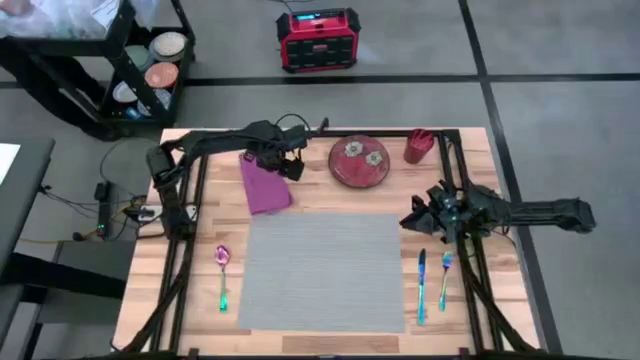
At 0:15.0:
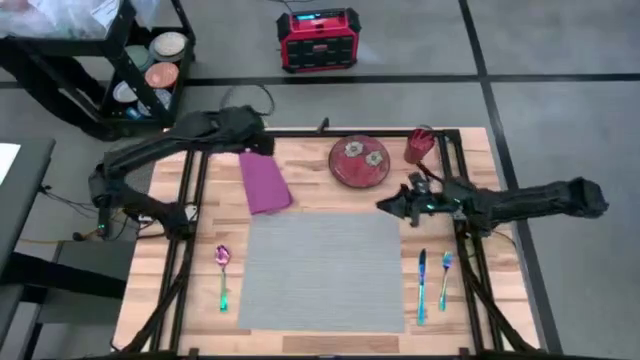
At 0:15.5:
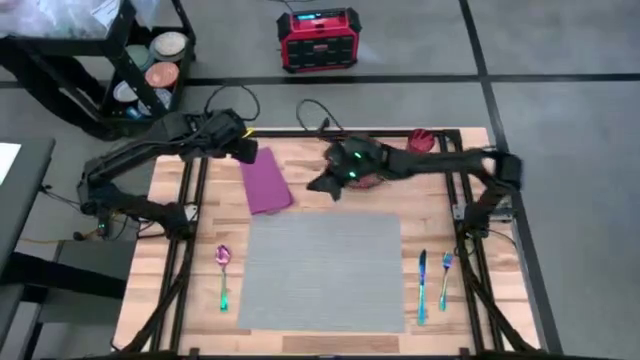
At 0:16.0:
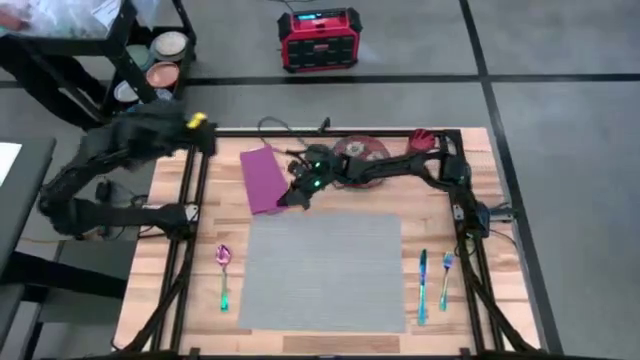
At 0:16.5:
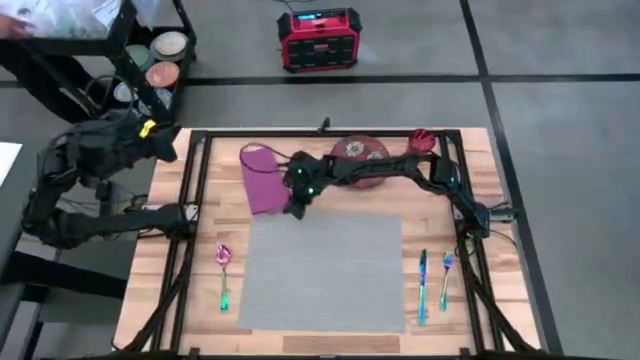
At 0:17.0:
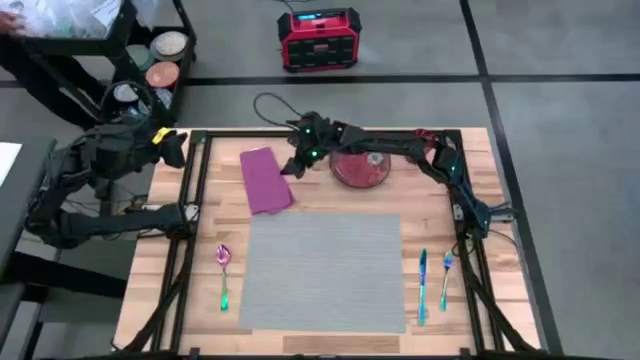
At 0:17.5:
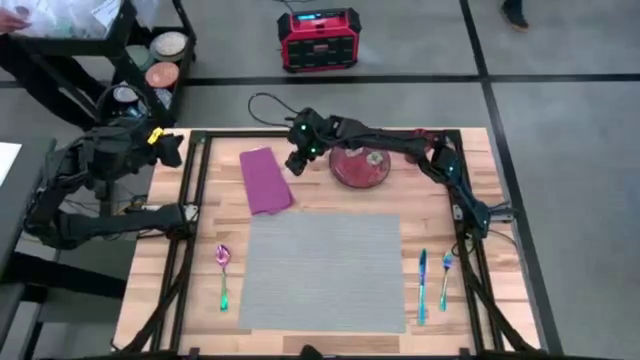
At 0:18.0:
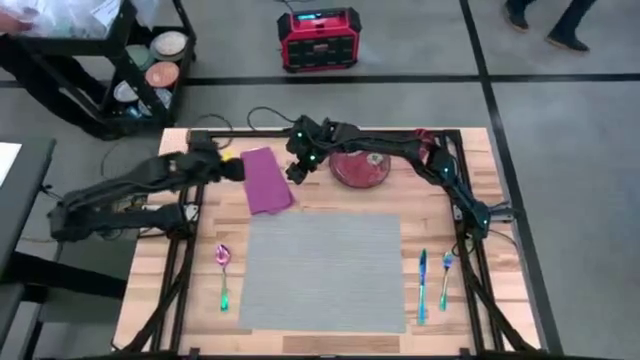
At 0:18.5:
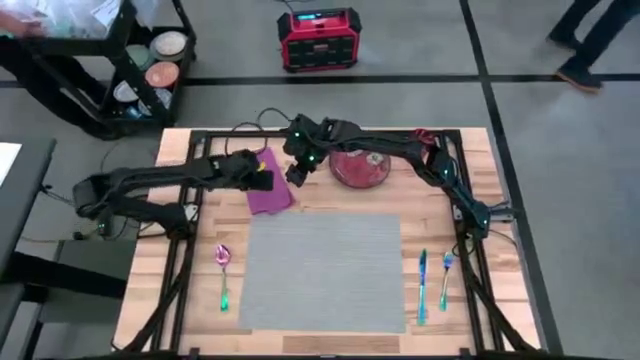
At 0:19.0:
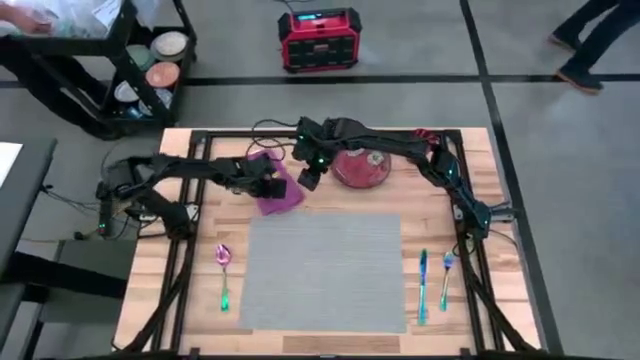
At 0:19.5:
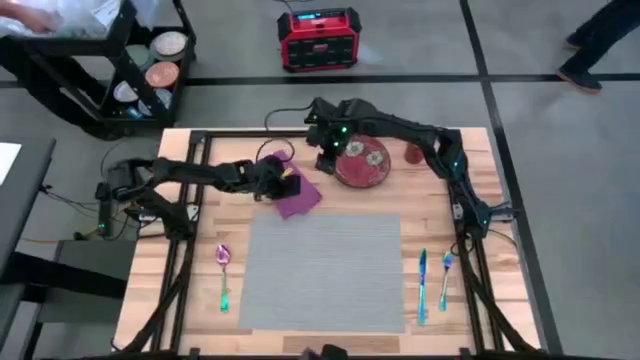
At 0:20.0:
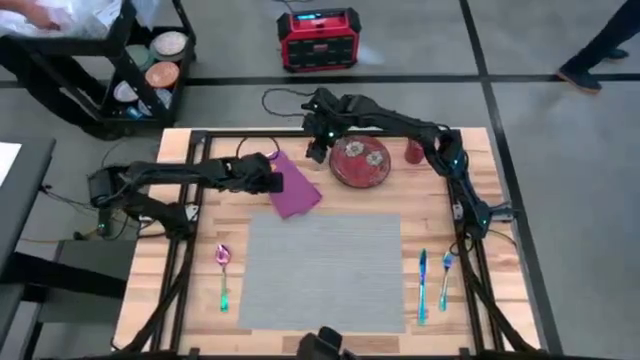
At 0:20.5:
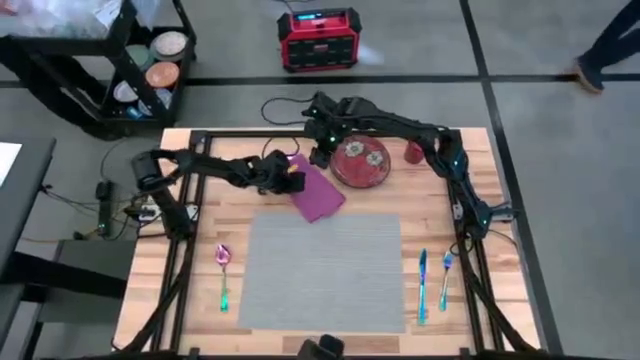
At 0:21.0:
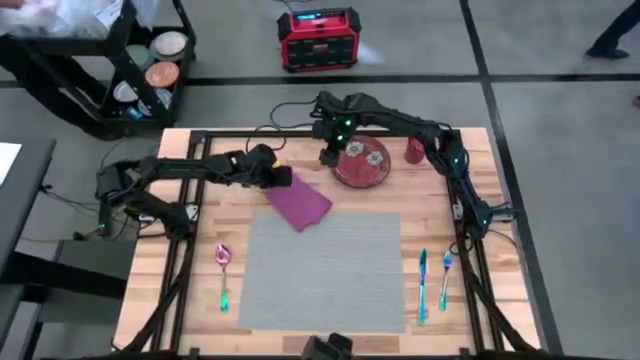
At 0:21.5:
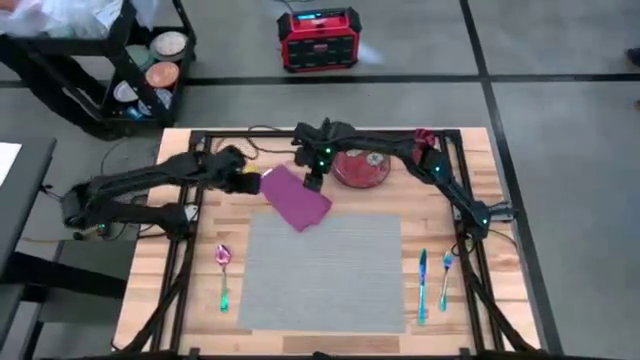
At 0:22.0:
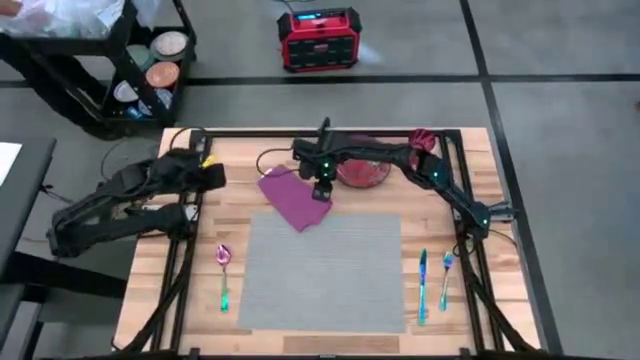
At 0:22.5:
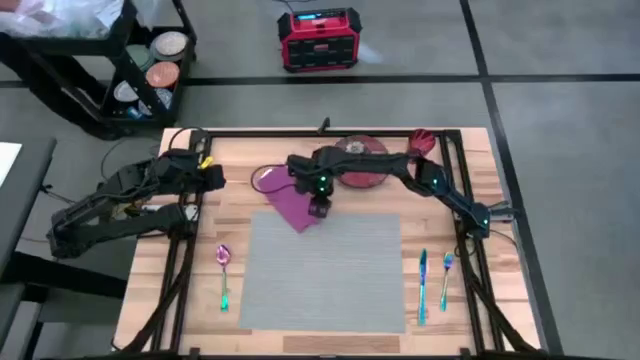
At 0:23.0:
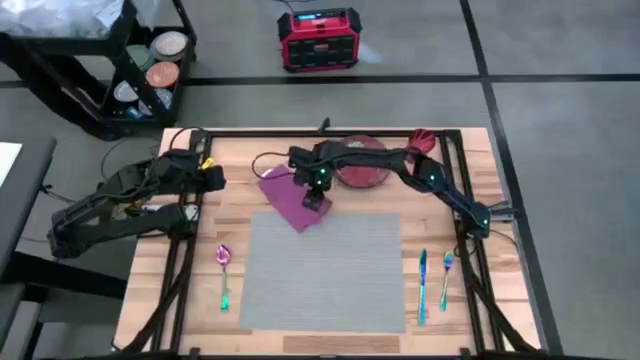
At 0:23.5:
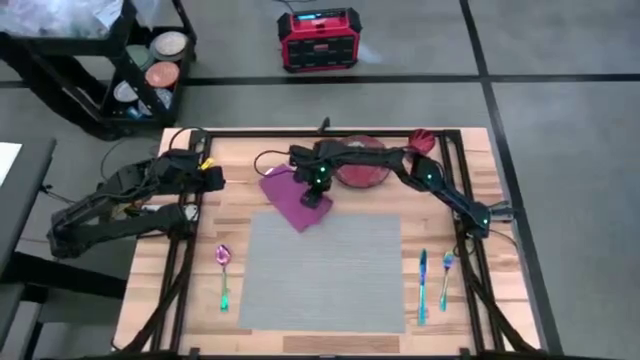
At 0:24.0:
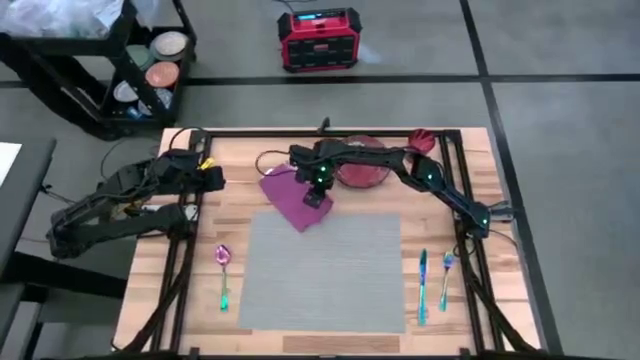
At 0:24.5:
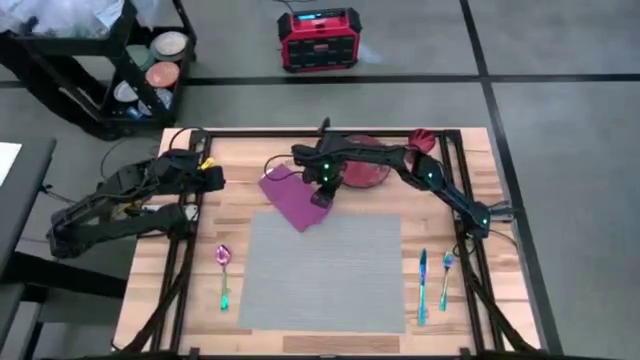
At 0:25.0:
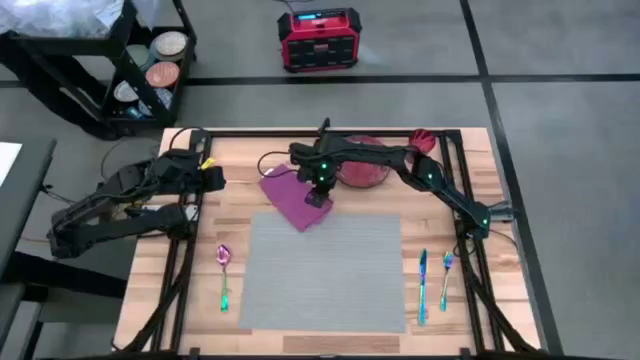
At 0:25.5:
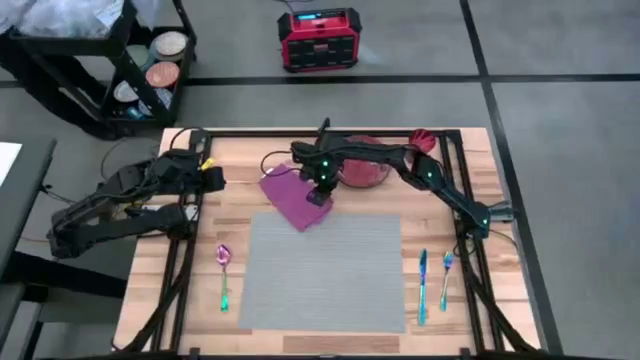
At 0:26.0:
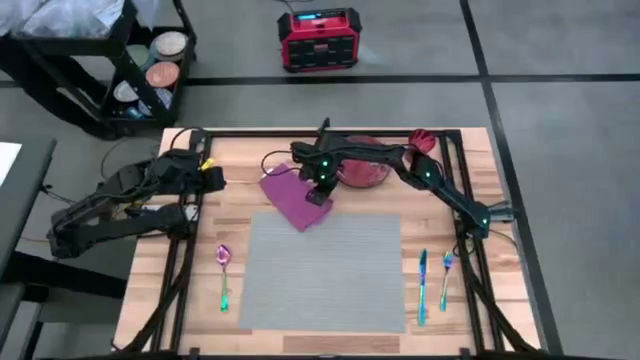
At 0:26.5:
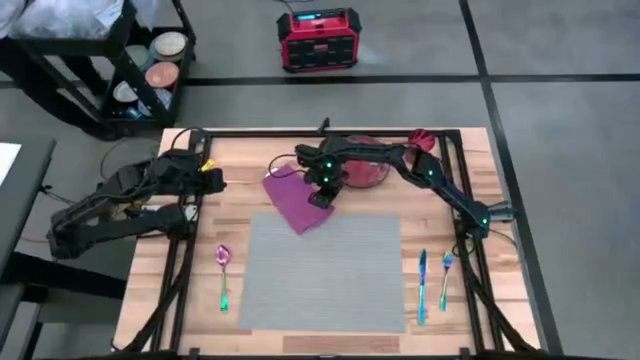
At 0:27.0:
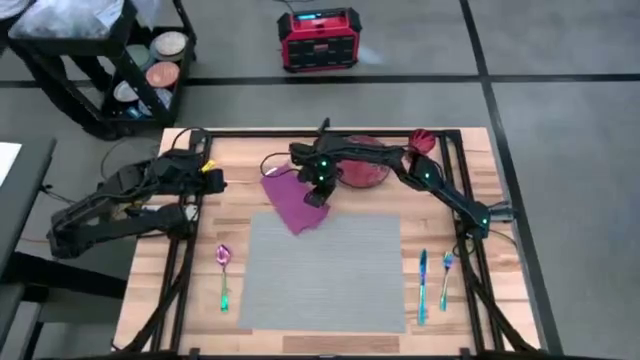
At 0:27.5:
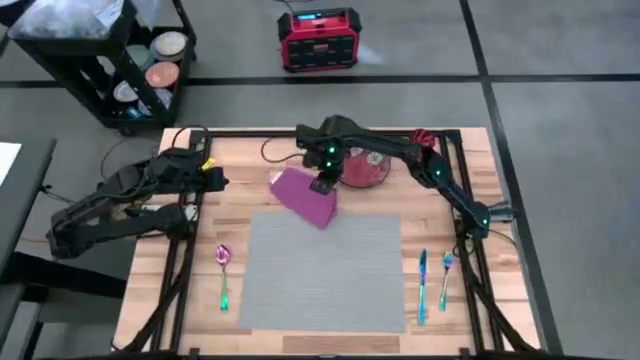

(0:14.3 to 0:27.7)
Task: Set table place
Put the violet table napkin on the gray table mat

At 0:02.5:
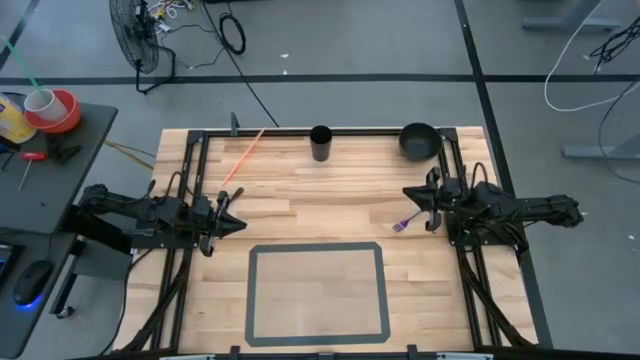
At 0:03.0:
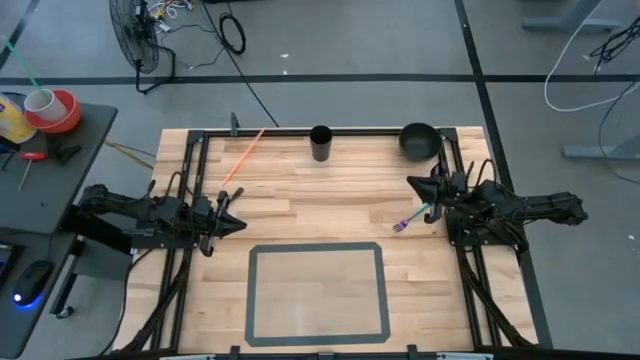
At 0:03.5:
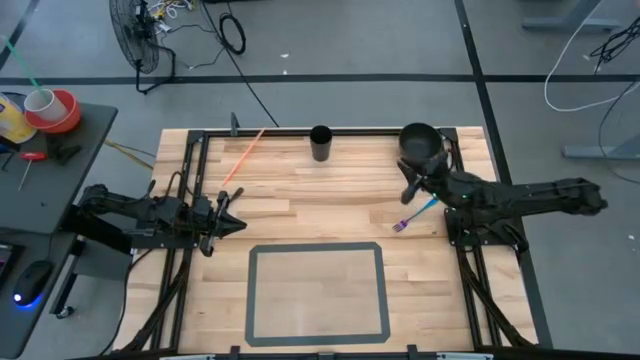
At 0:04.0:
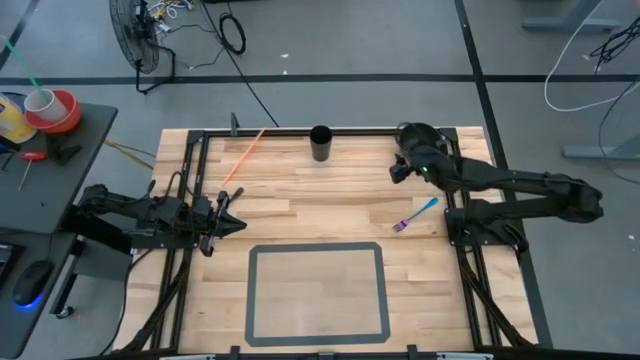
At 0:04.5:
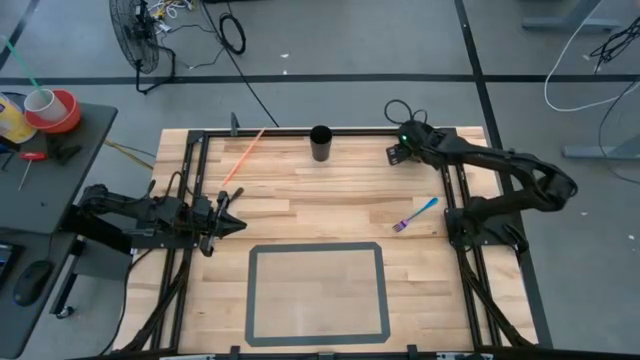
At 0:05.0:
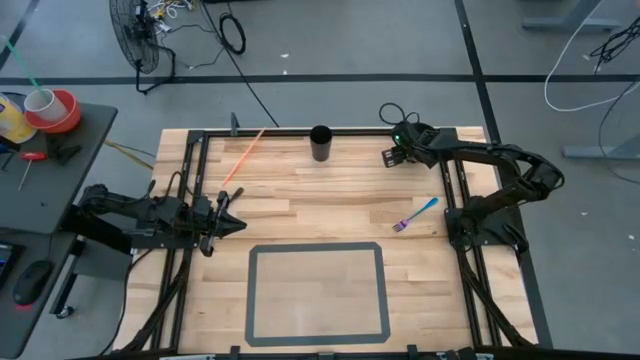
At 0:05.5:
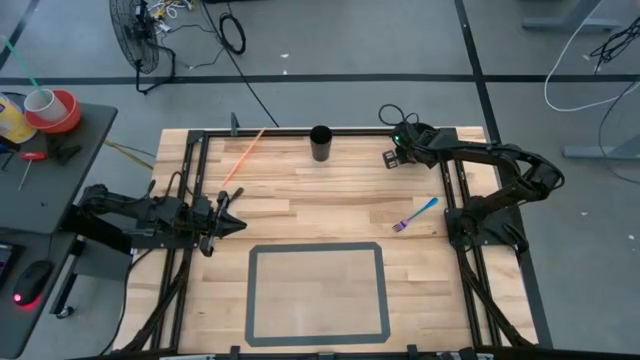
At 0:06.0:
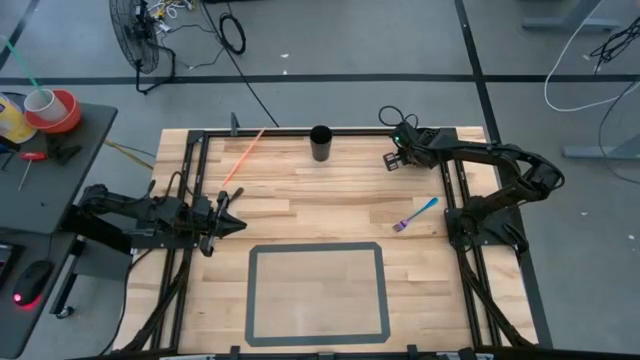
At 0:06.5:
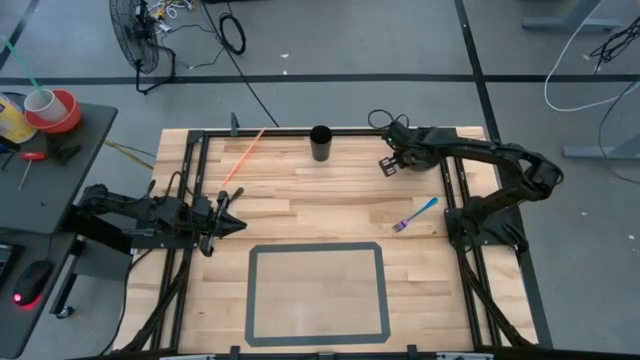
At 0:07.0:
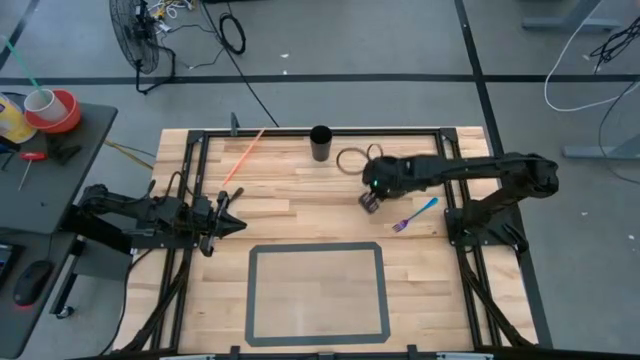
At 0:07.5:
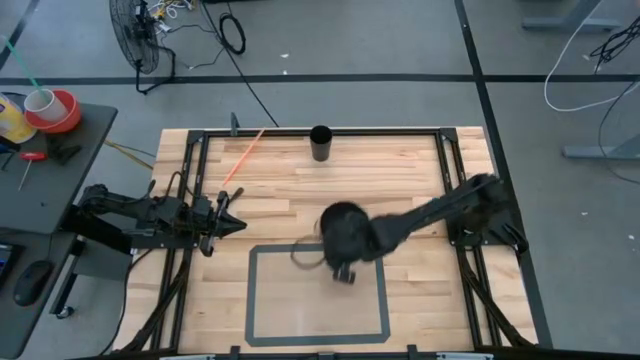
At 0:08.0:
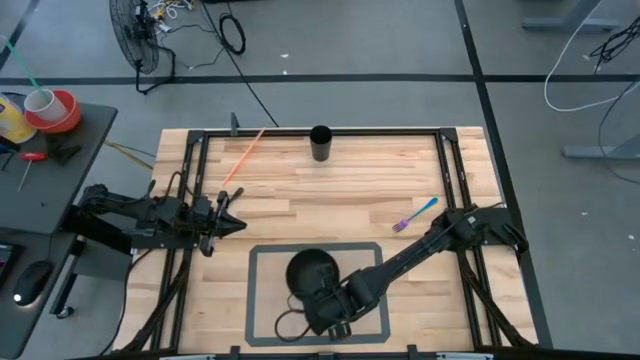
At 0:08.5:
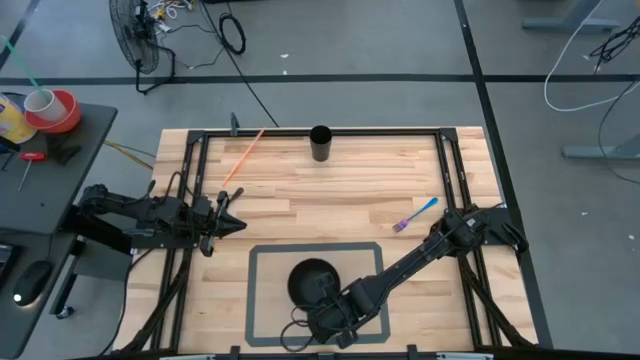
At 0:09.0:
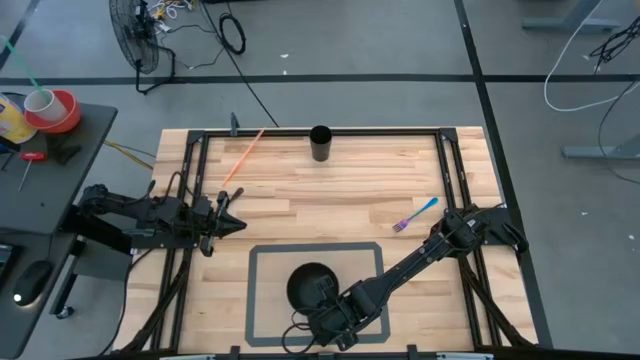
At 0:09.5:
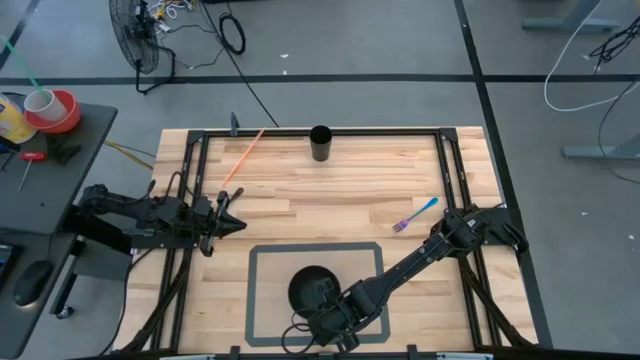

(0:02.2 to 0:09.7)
Task: Pick & Place Utensil
Put the black bowl on the transparent mat
